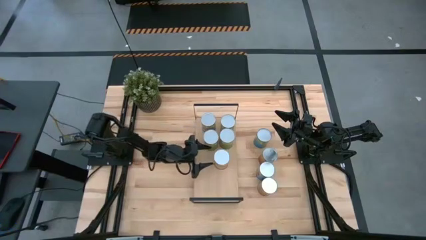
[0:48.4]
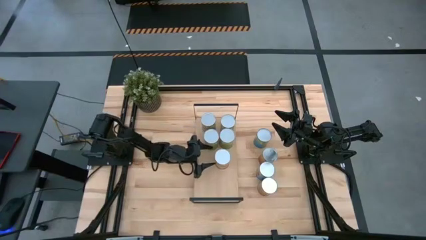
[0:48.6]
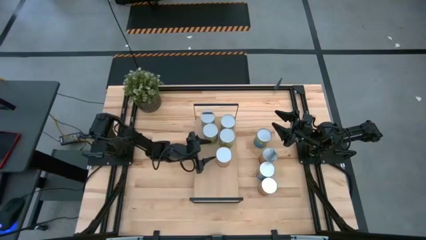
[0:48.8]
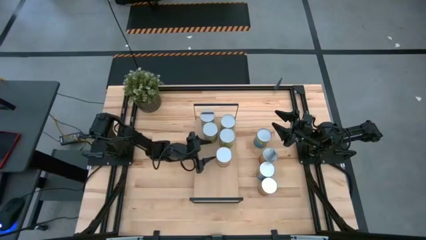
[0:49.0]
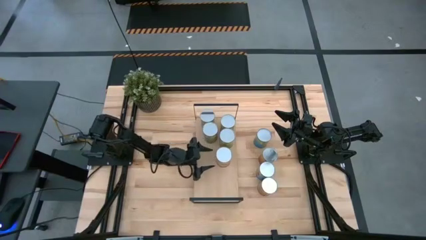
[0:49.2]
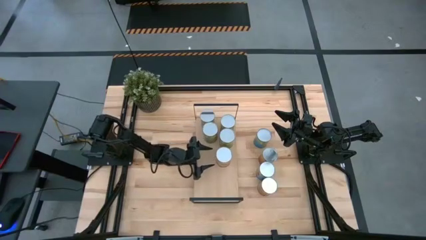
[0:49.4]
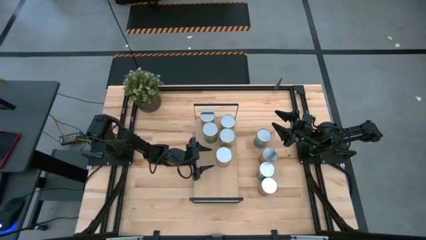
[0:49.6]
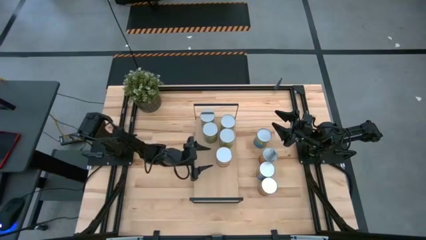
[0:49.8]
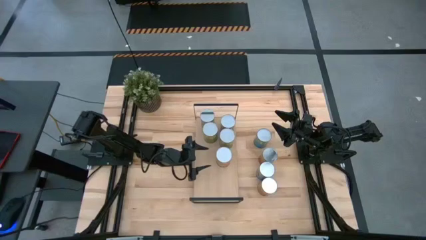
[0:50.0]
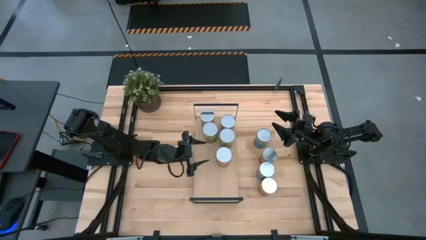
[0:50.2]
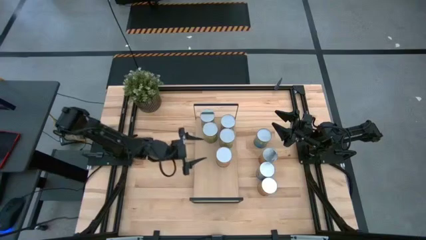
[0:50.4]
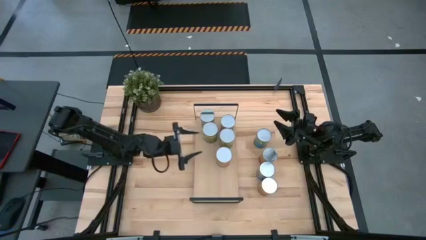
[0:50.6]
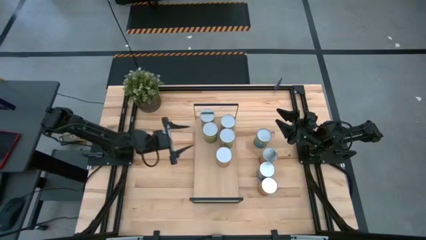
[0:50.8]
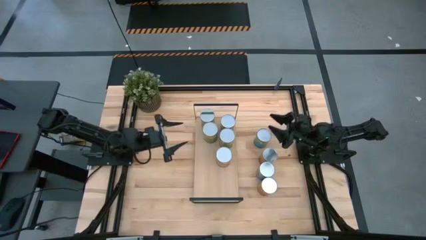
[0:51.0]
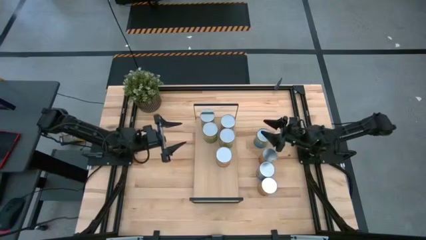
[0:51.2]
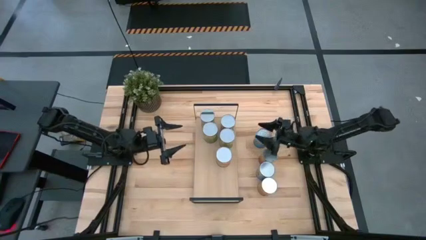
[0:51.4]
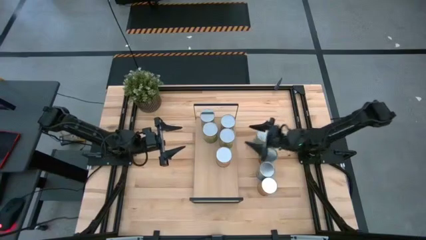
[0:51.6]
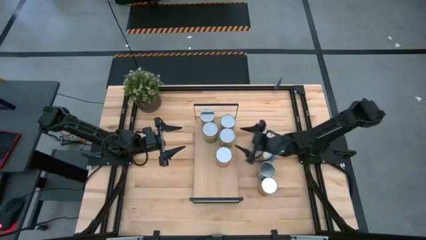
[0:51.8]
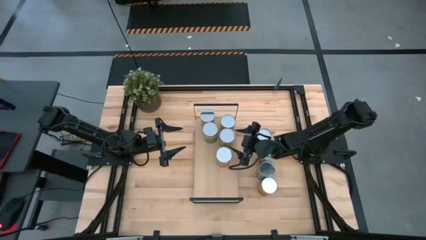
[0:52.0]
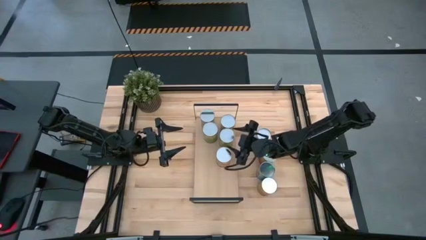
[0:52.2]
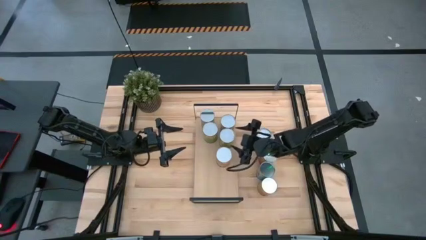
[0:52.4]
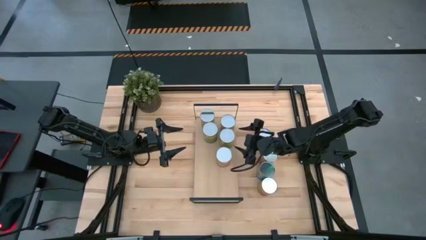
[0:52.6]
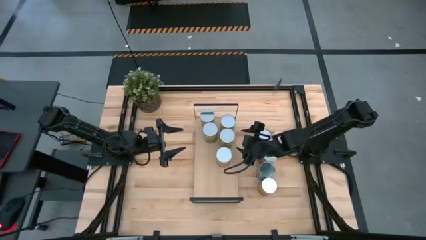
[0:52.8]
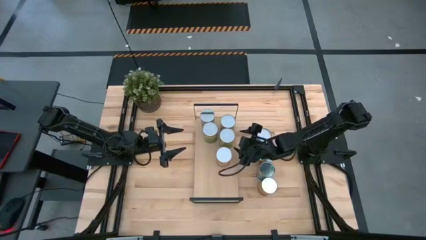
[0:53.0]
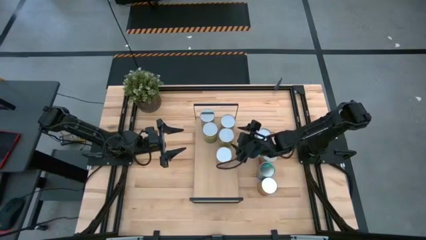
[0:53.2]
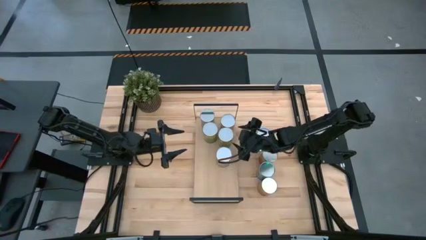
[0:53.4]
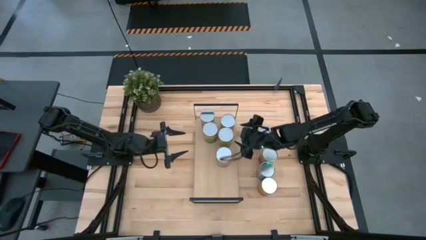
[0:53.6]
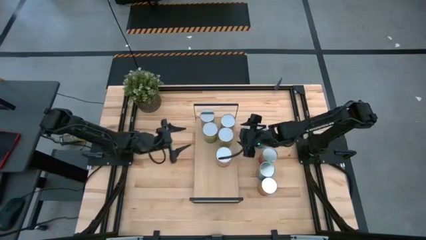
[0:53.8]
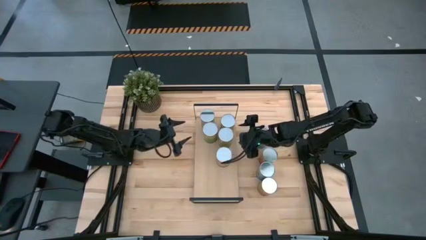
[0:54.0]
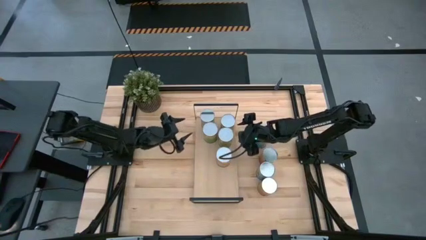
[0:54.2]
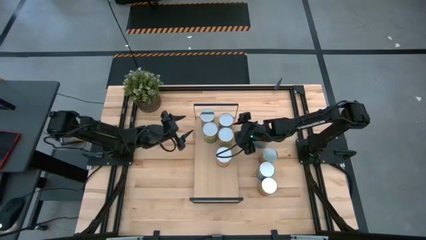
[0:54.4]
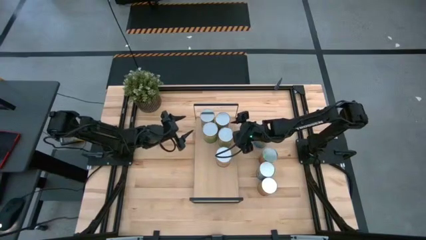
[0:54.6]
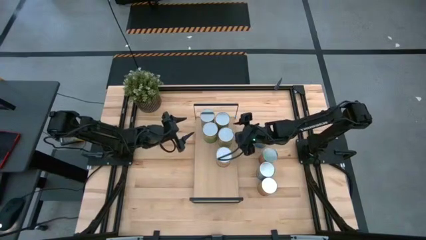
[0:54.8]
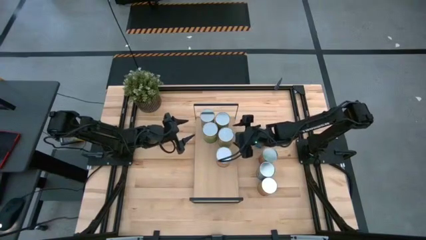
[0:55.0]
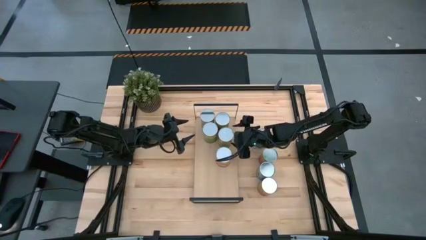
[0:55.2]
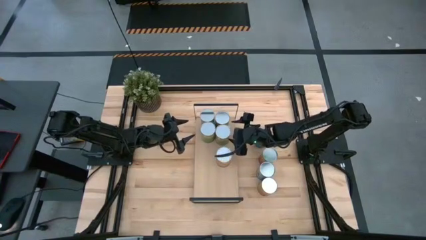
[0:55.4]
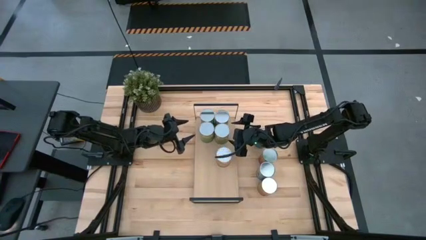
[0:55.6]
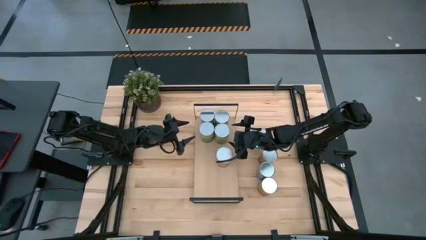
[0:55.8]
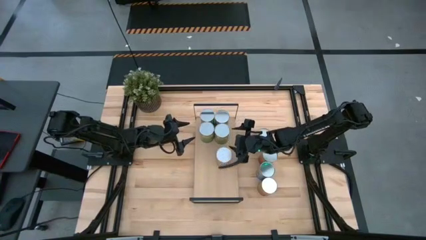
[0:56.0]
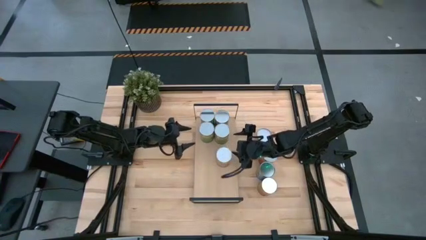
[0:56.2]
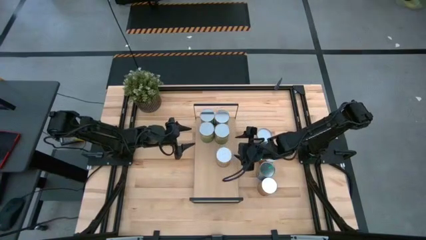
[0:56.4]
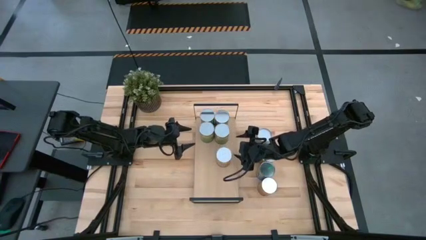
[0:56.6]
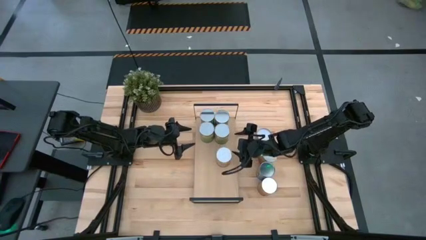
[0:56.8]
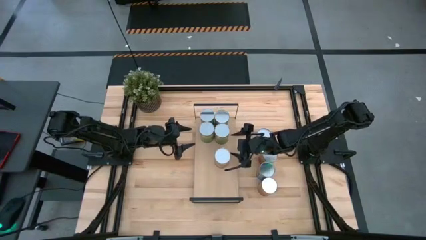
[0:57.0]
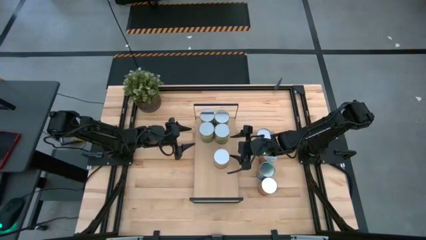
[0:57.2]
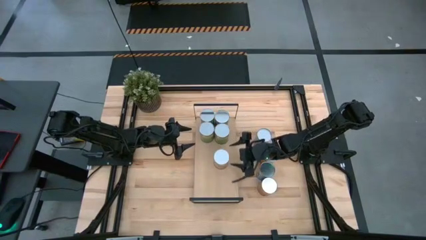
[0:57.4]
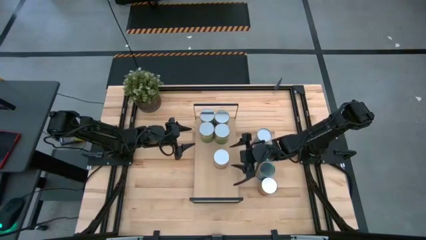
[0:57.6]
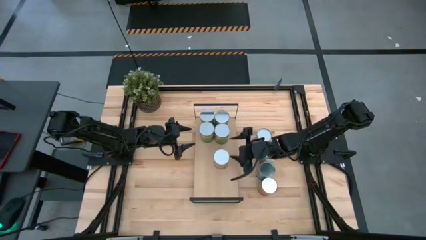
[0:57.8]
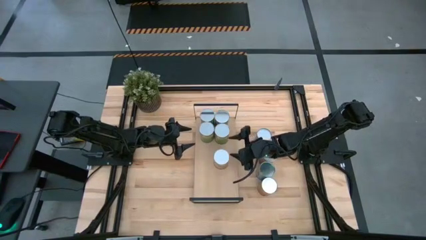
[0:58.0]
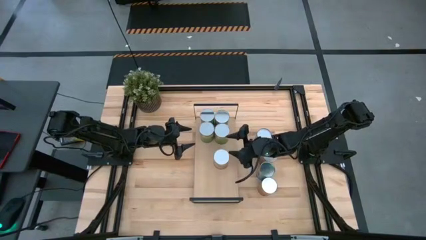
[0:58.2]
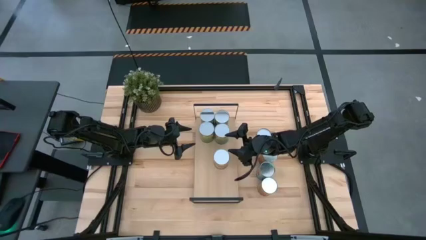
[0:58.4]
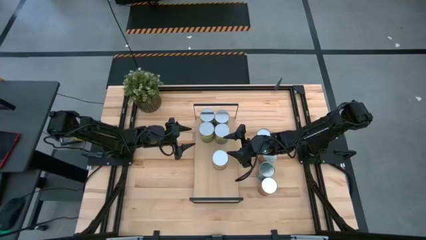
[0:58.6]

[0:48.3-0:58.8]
Task: Pick and place cans onto a shelf
Adjust the canned fruits on the shelf

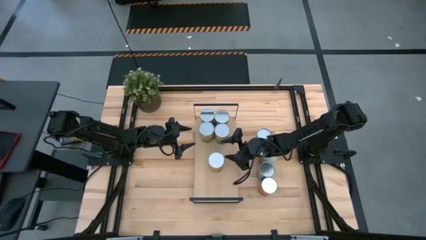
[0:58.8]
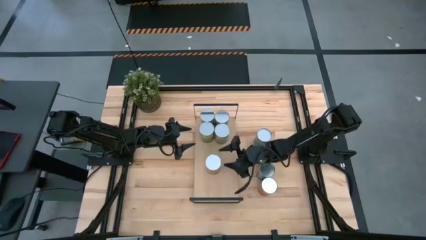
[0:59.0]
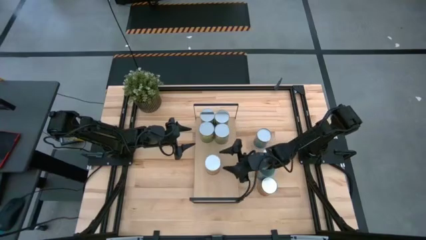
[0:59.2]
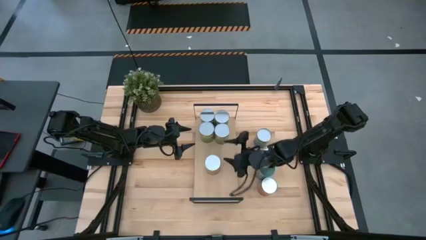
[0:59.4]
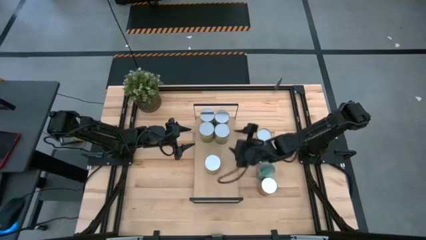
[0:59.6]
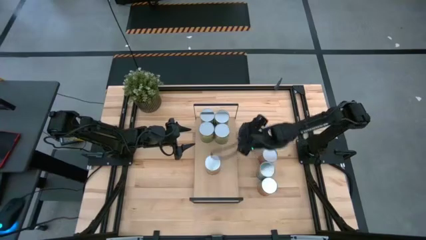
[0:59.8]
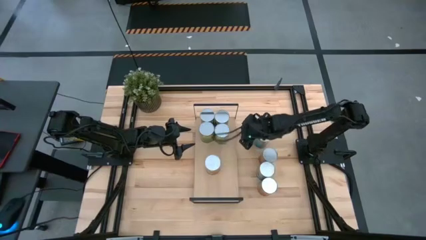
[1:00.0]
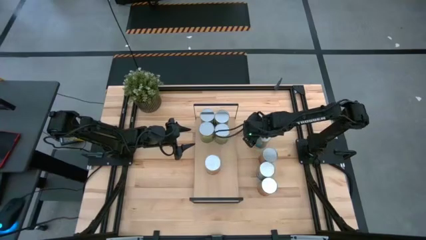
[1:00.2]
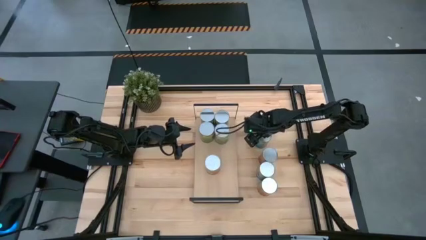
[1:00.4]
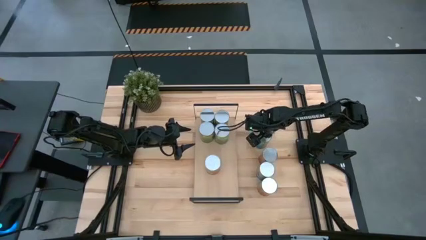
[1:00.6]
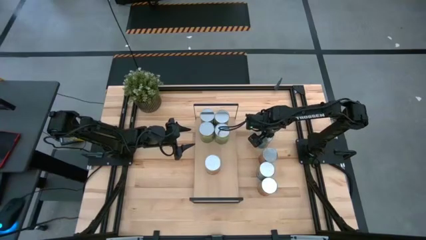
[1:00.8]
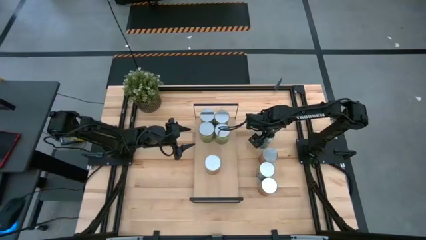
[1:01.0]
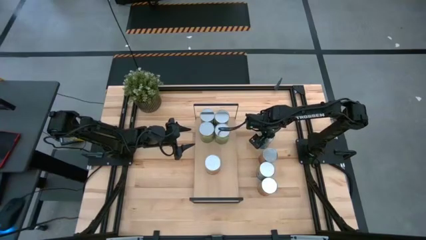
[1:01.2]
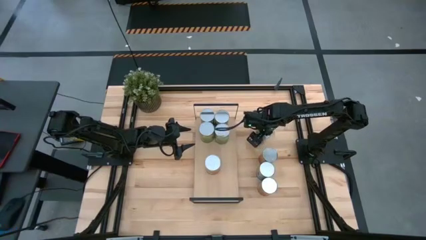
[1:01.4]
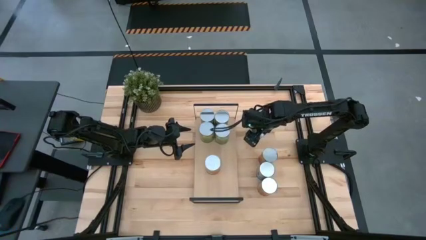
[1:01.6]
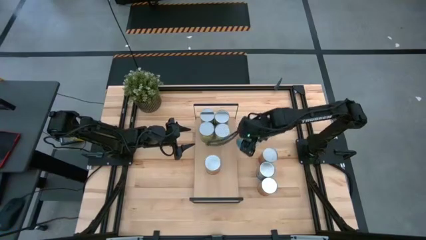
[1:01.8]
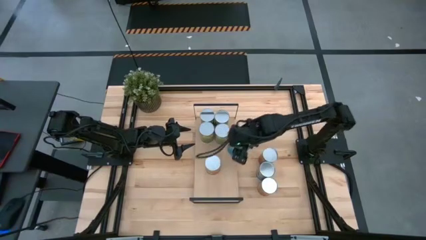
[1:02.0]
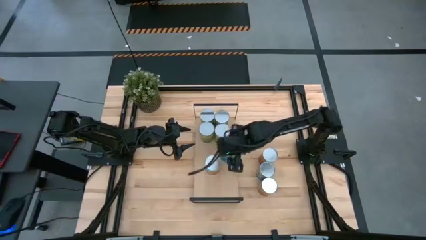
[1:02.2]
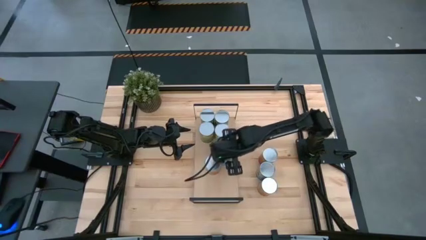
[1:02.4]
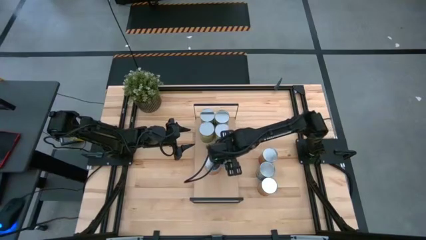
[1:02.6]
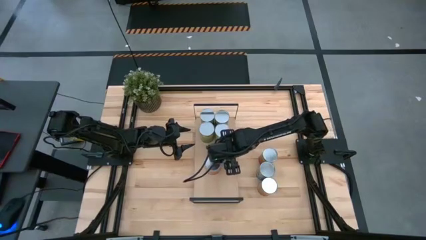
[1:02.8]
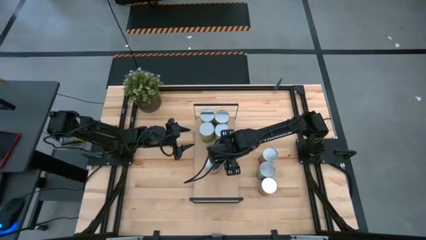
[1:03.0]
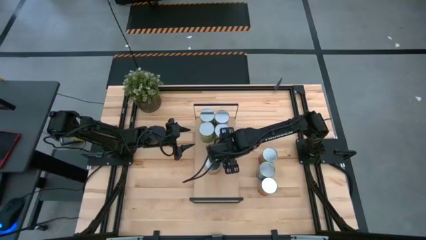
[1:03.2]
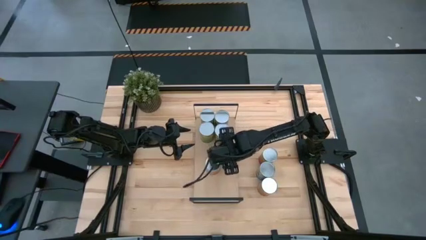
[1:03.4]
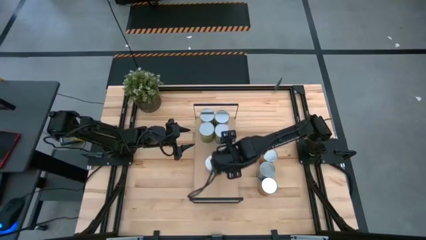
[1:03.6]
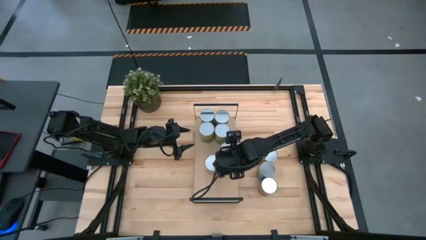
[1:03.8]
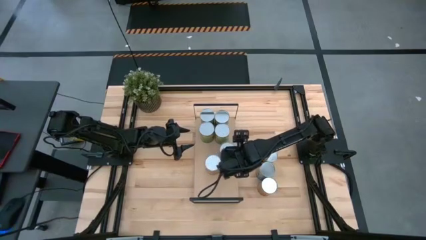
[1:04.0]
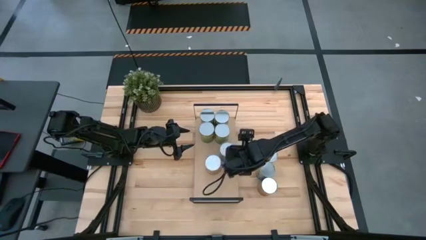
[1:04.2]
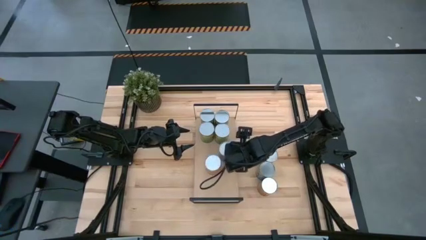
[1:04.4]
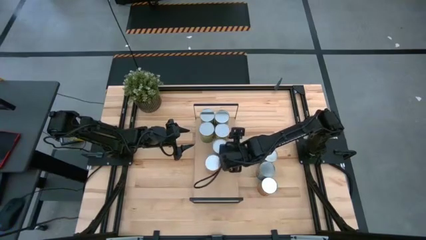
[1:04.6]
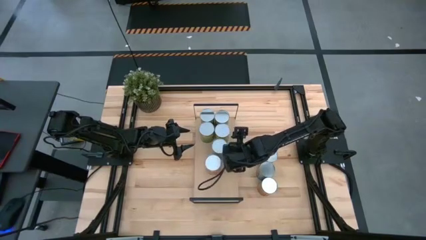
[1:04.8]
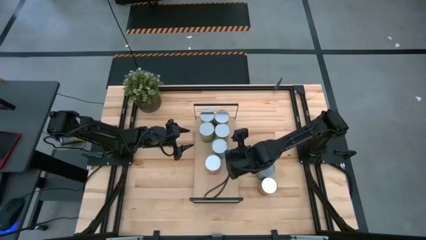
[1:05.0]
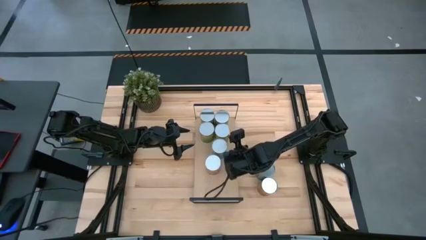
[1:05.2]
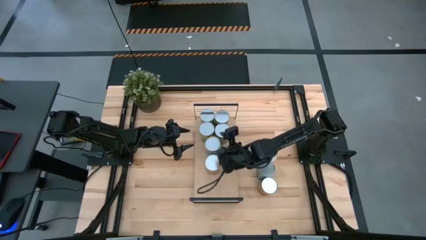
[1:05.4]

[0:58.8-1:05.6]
Put the canned cherries on the shelf
